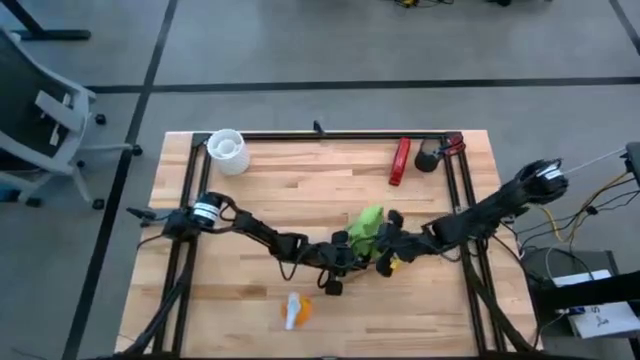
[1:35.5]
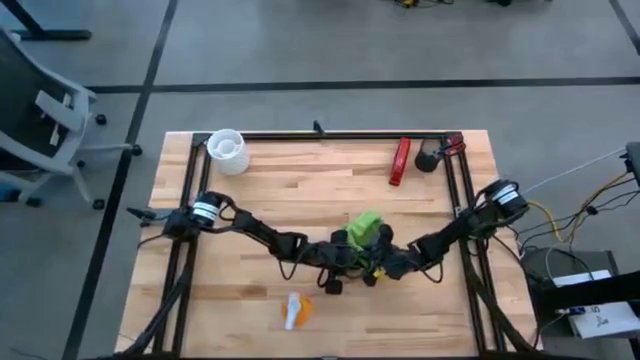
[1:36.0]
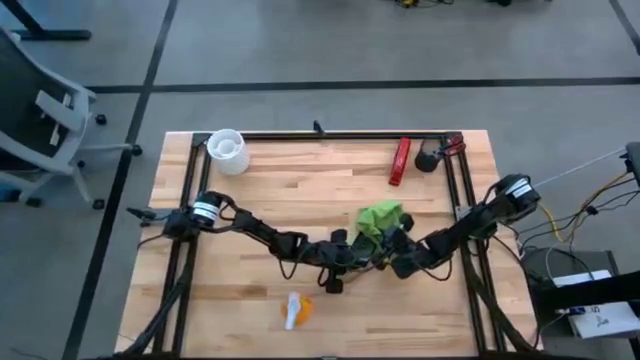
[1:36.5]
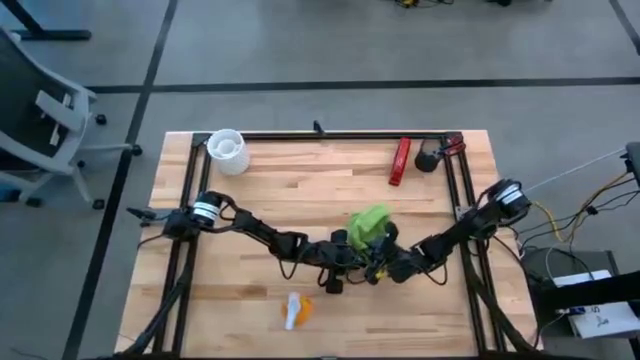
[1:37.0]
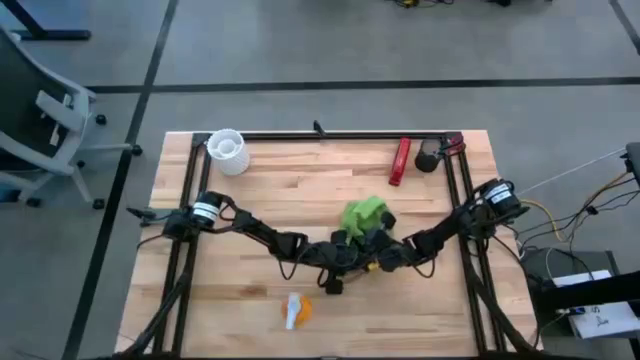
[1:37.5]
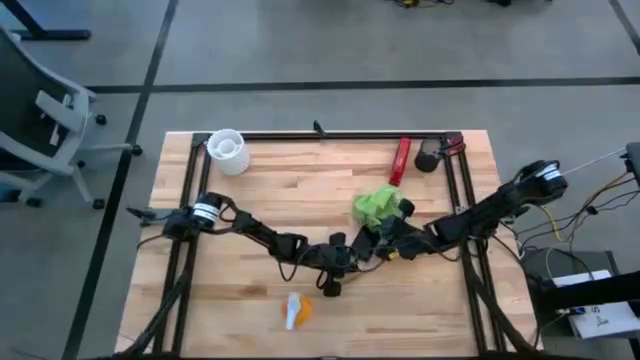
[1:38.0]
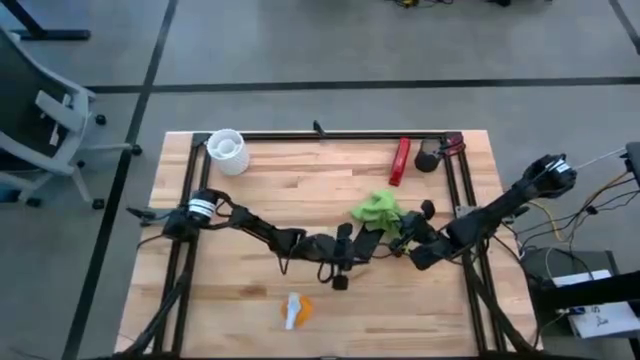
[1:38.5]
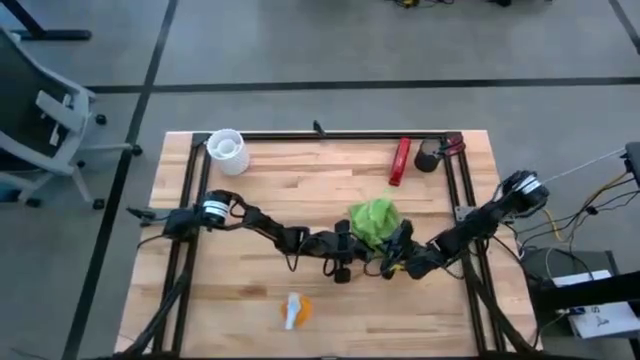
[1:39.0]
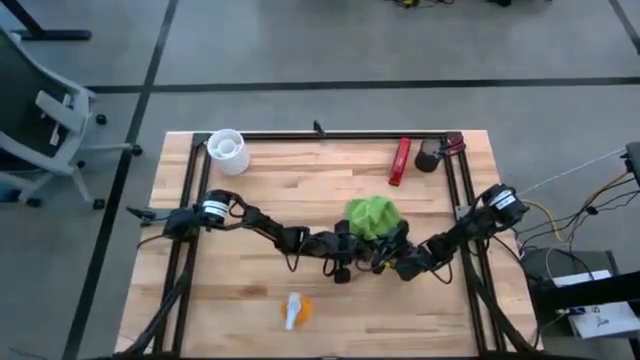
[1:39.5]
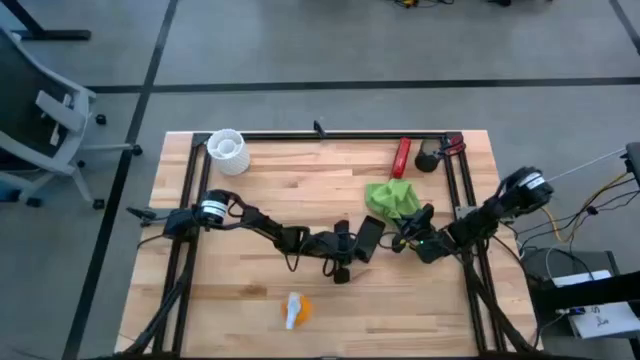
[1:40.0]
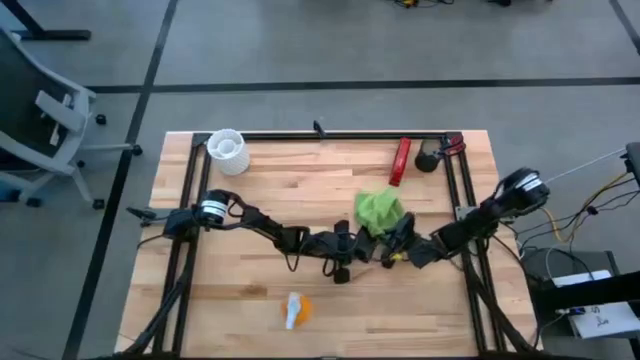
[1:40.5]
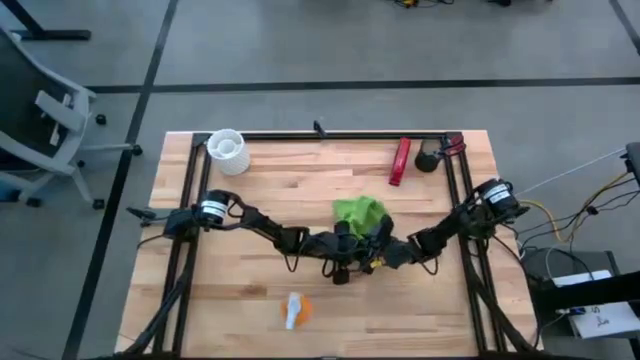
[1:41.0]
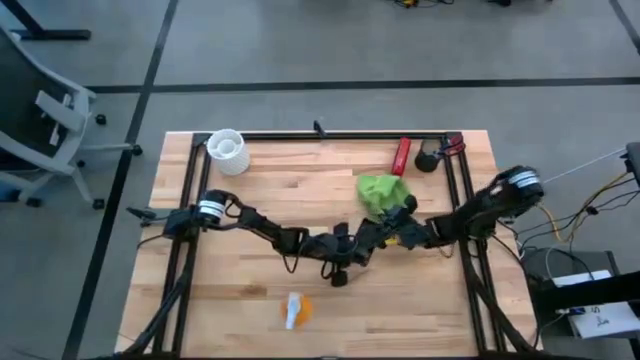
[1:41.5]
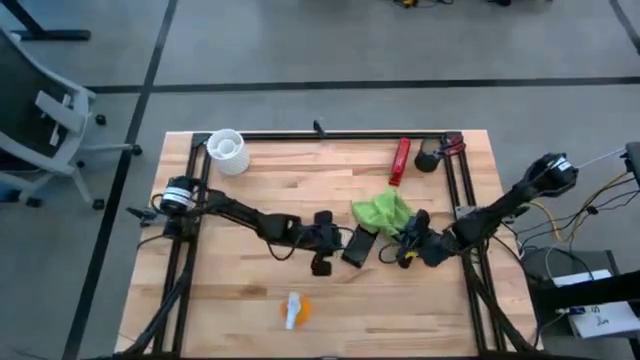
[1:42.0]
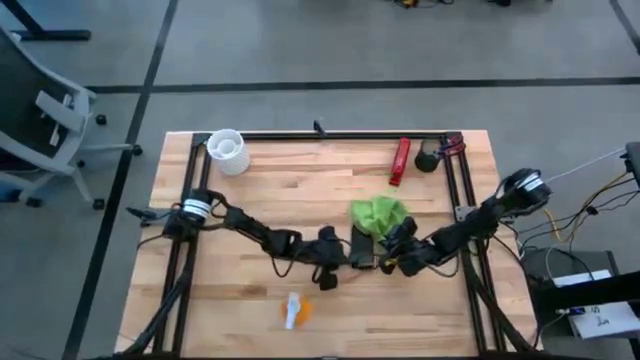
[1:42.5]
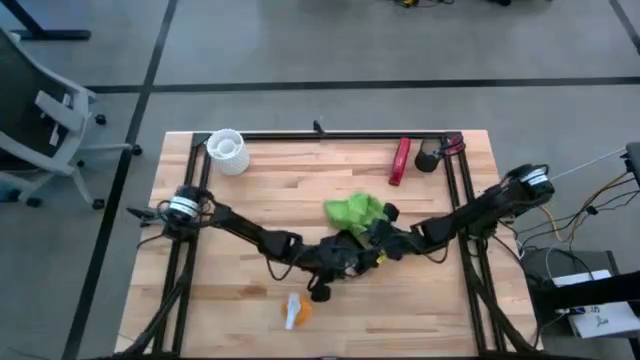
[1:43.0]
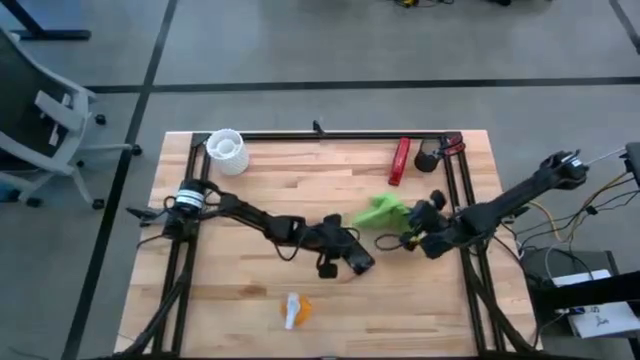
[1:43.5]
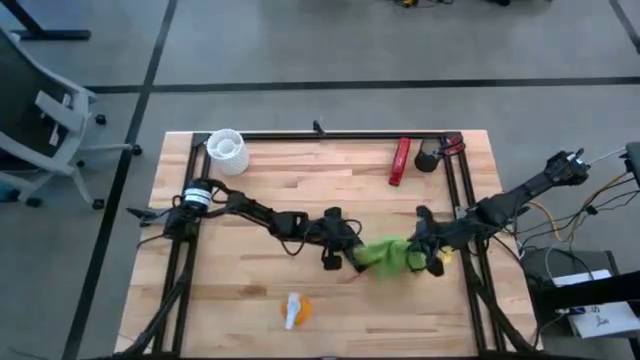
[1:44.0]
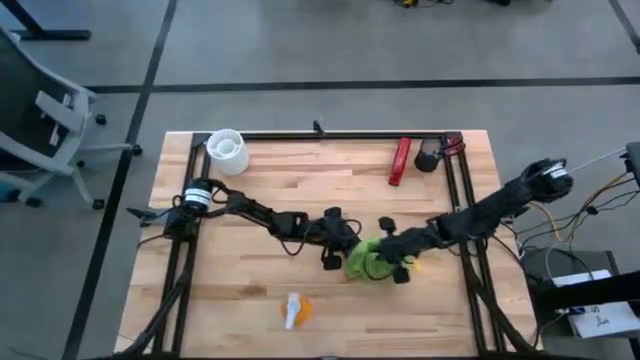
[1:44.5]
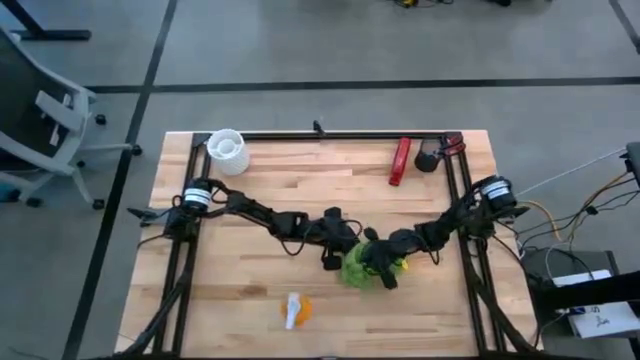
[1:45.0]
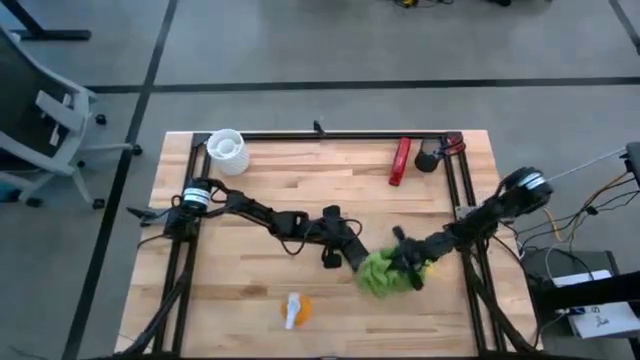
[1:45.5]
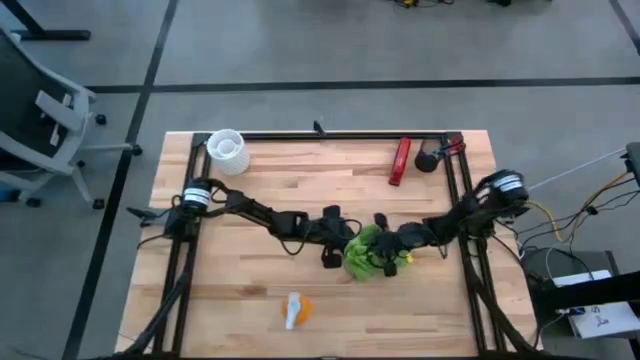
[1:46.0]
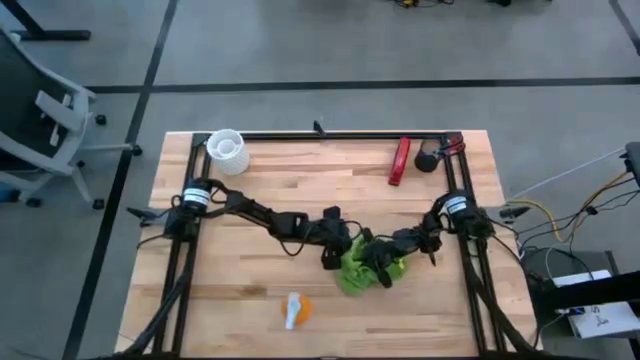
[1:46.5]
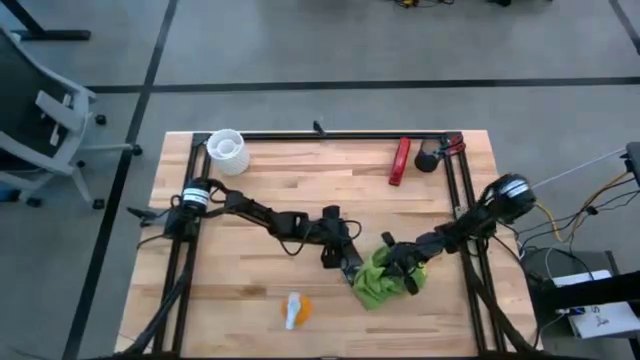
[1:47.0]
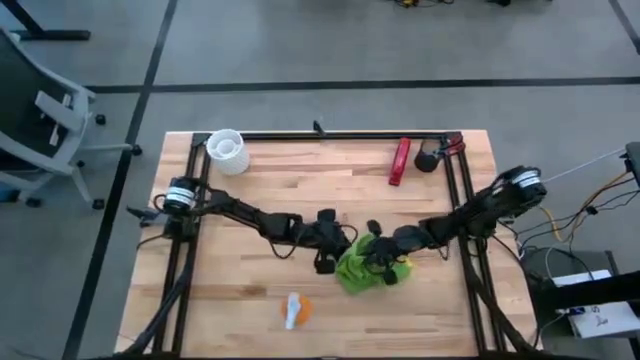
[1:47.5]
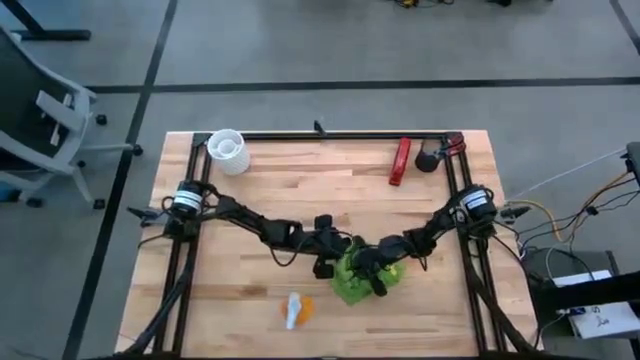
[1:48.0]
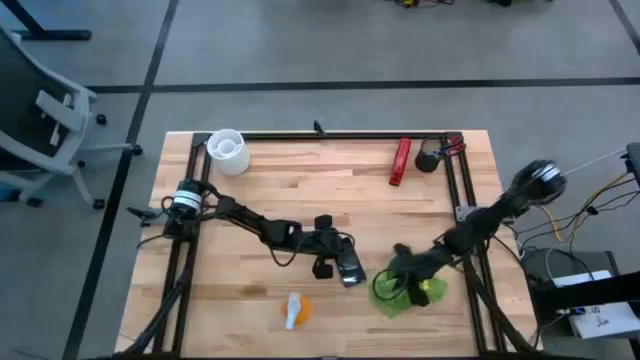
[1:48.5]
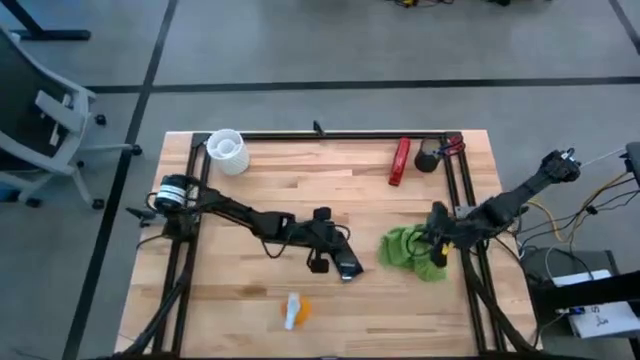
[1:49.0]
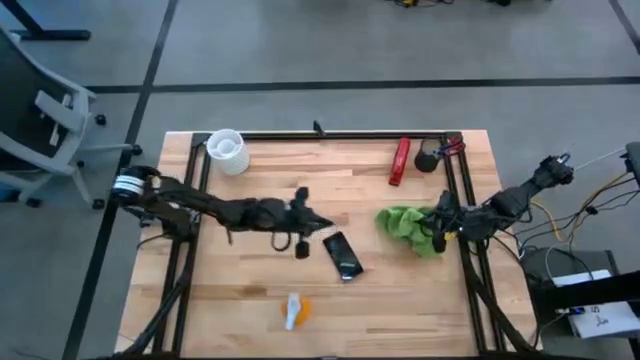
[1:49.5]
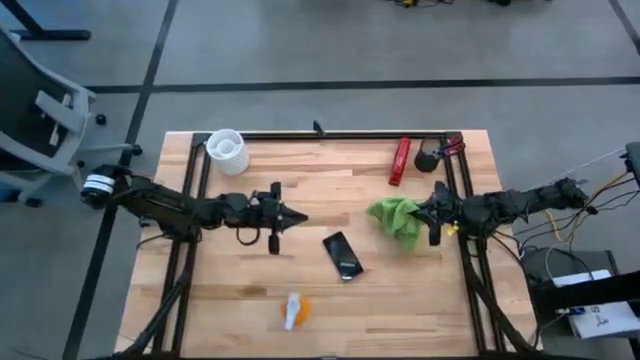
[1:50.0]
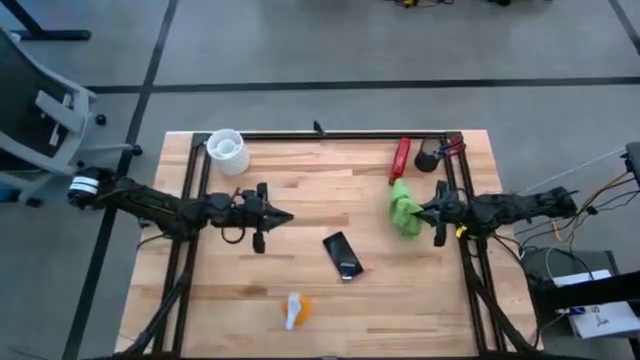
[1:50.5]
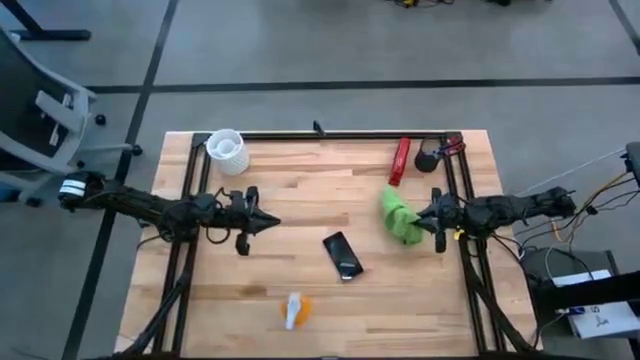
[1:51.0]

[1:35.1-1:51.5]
Task: Apply microfiber cloth
Wipe the back and front of the cellphone using the microfiber cloth

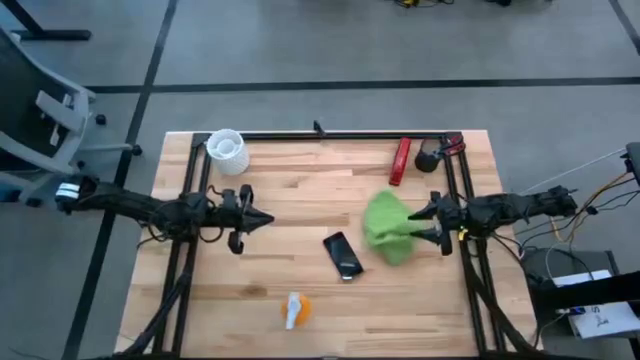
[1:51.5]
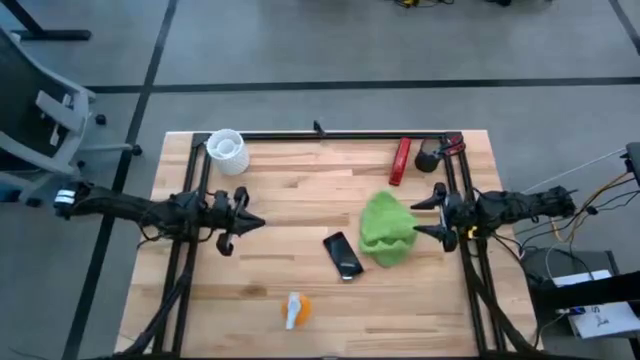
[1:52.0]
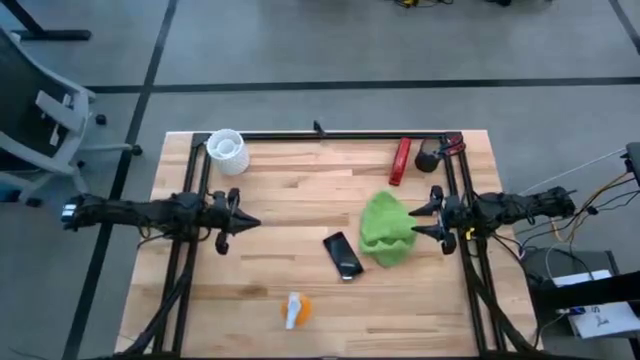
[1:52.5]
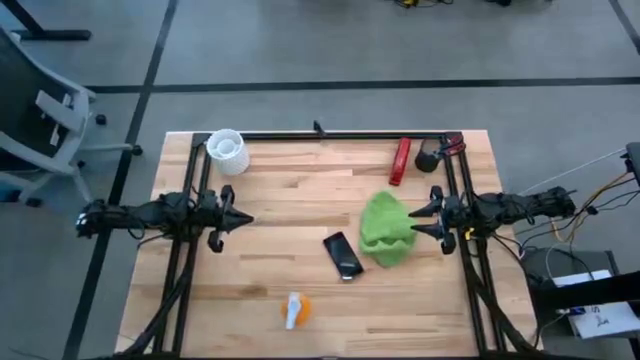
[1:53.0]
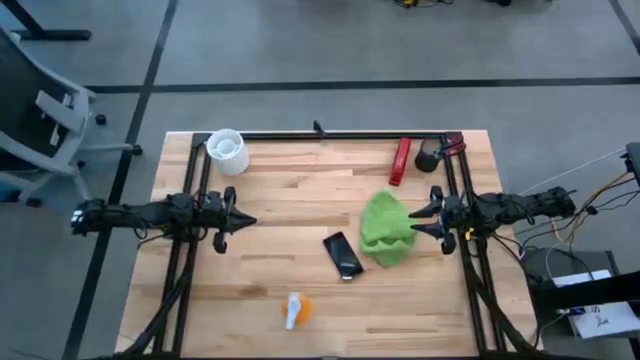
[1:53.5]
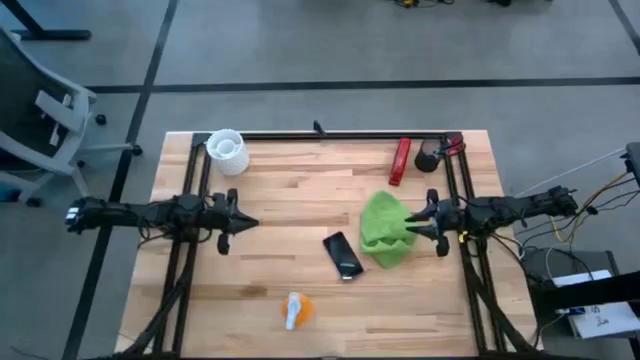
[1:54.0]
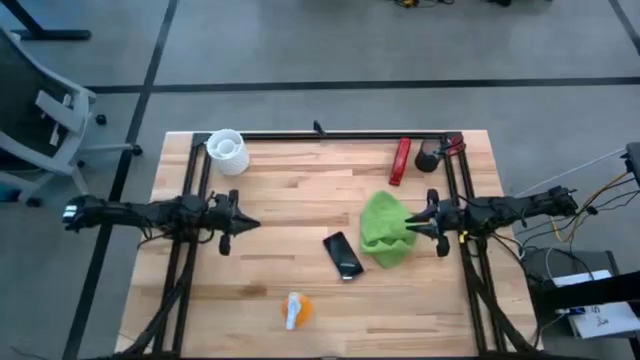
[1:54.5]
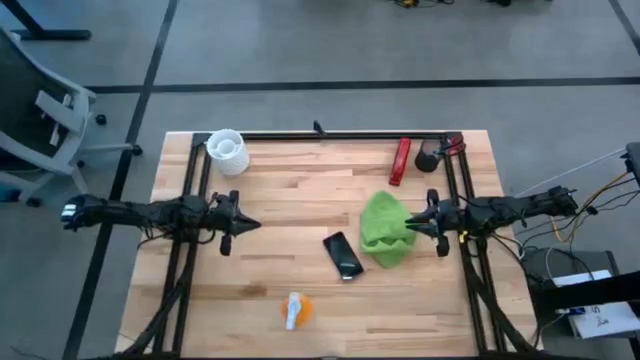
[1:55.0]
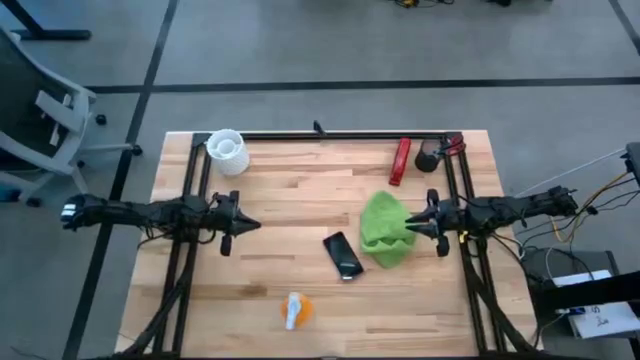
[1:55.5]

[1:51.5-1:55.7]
Return to Home Position

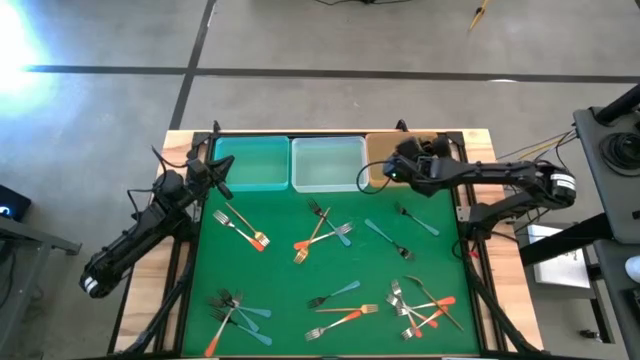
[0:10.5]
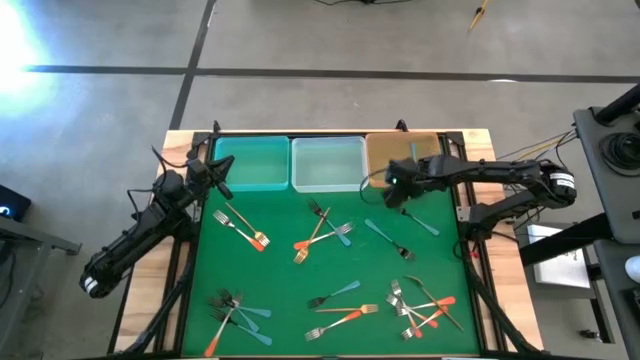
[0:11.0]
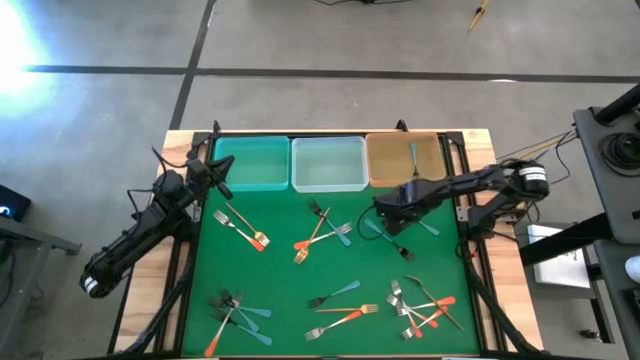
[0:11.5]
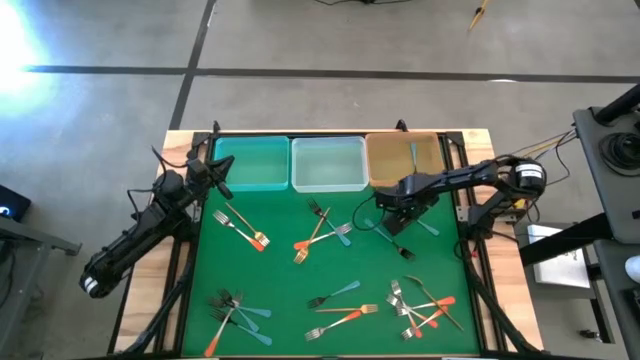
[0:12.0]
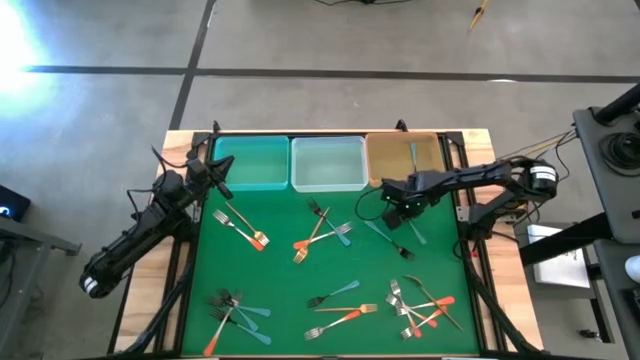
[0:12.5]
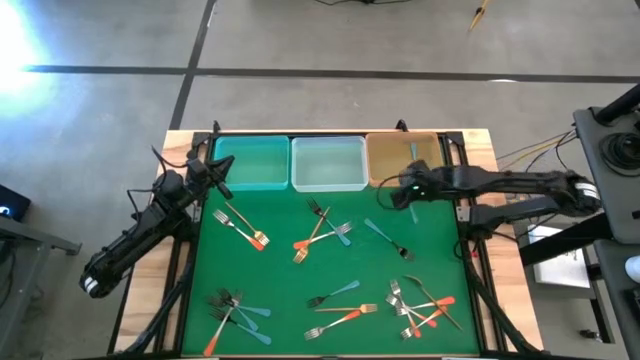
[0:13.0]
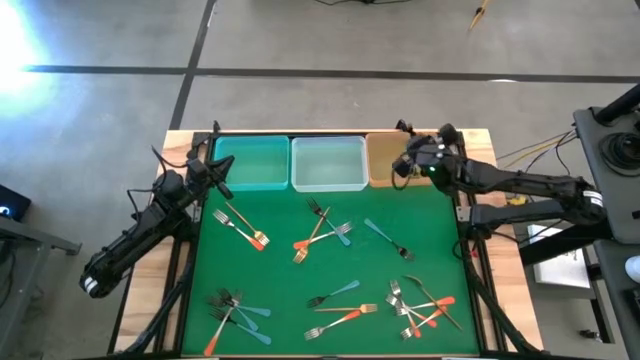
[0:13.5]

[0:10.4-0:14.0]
Task: Sort silverware by color (type)
Put the blue fork into the orange bin
